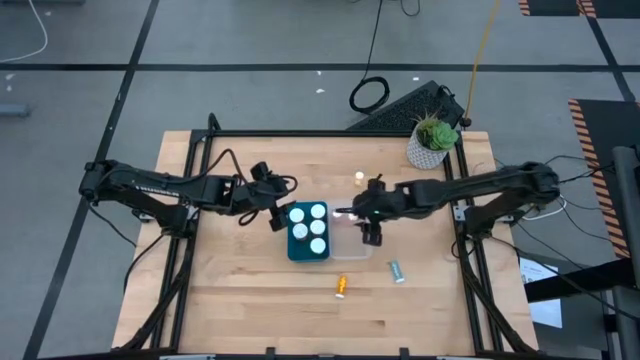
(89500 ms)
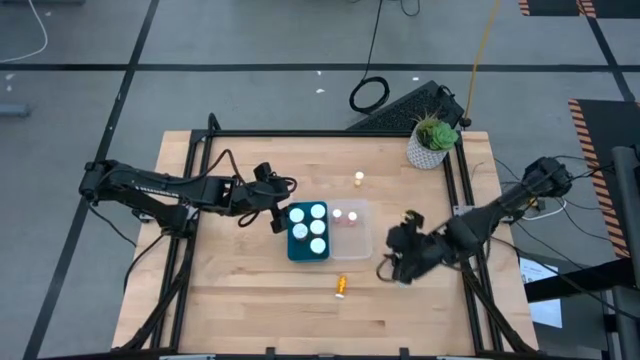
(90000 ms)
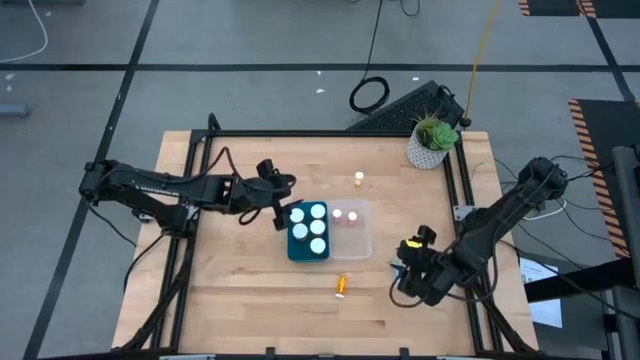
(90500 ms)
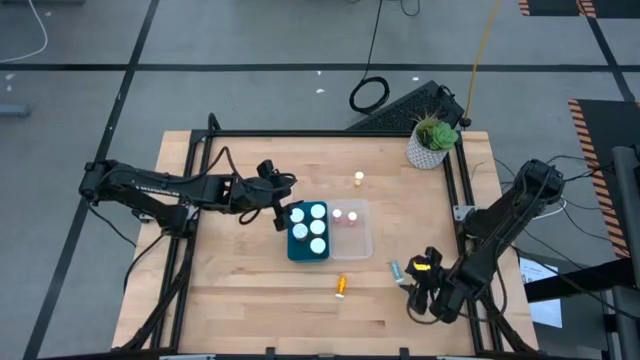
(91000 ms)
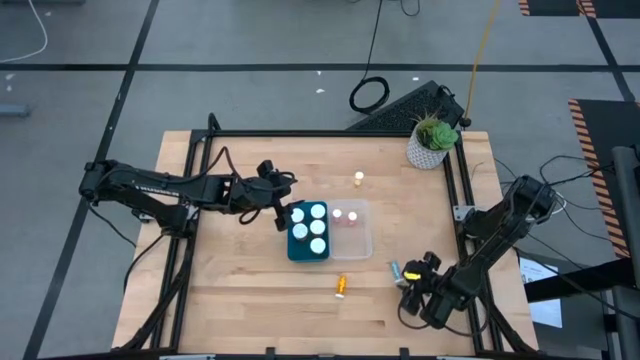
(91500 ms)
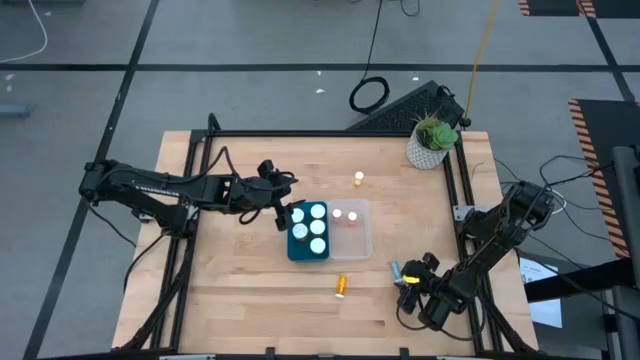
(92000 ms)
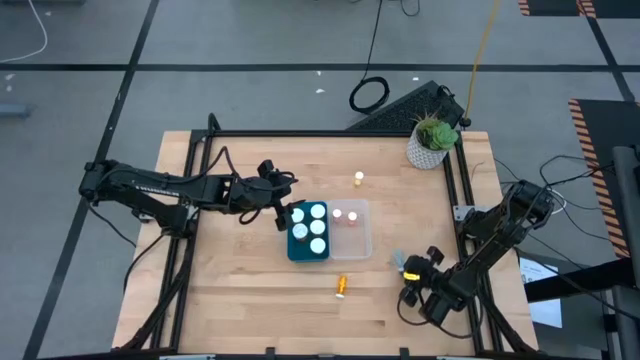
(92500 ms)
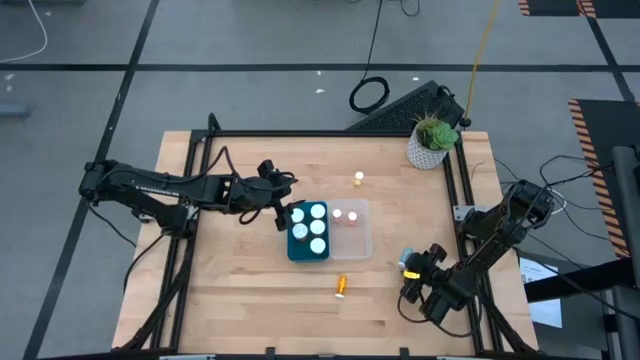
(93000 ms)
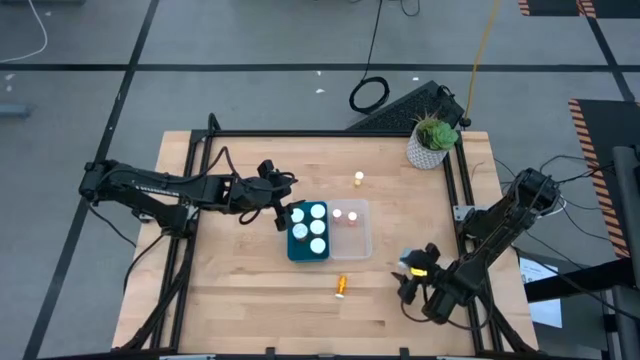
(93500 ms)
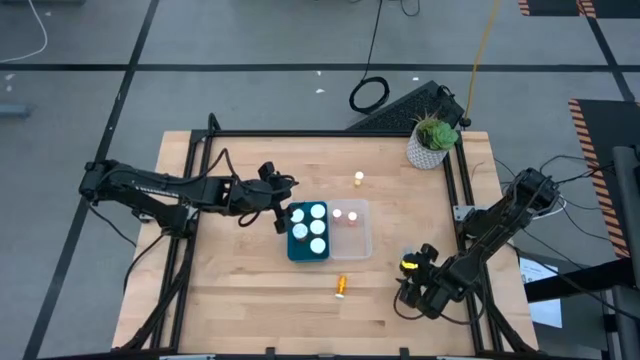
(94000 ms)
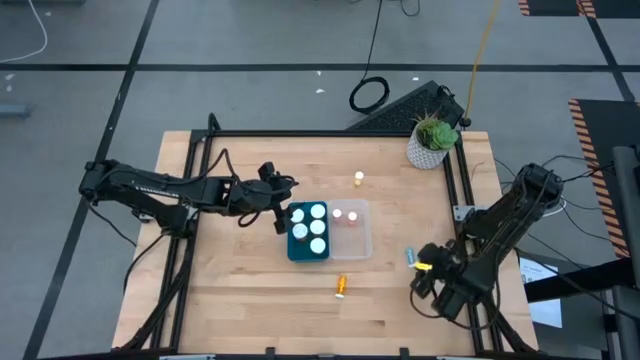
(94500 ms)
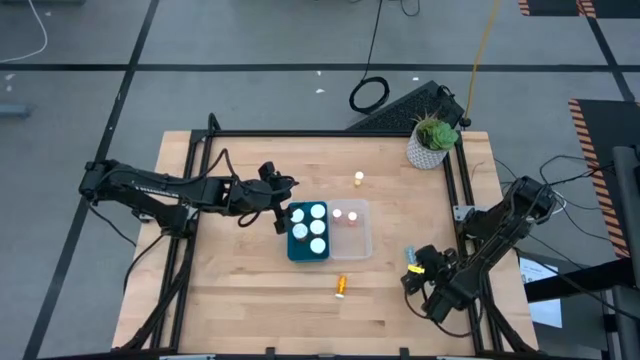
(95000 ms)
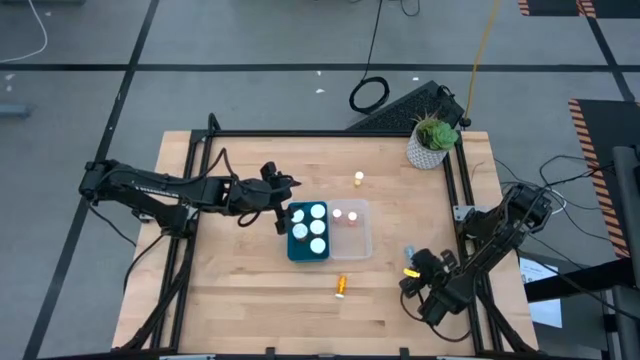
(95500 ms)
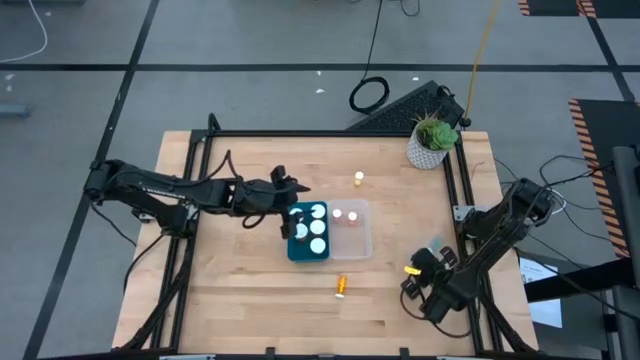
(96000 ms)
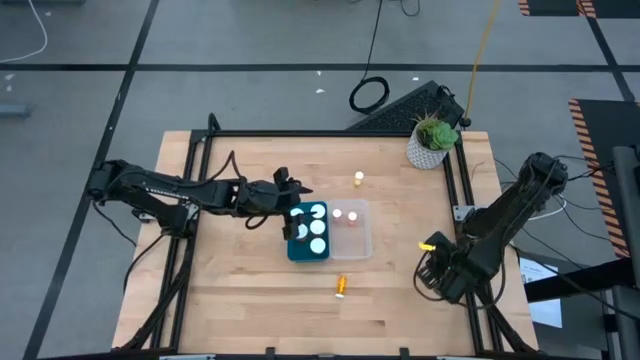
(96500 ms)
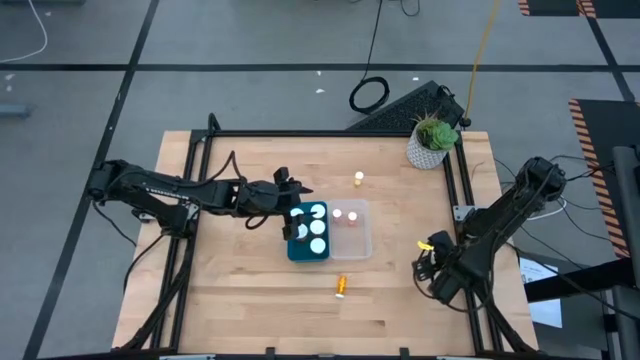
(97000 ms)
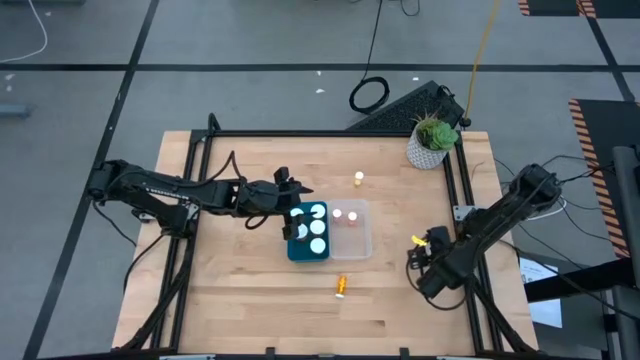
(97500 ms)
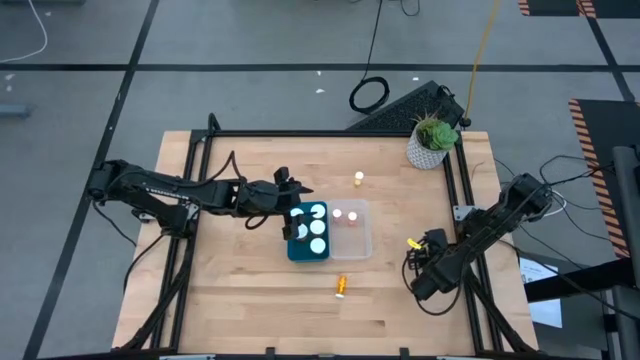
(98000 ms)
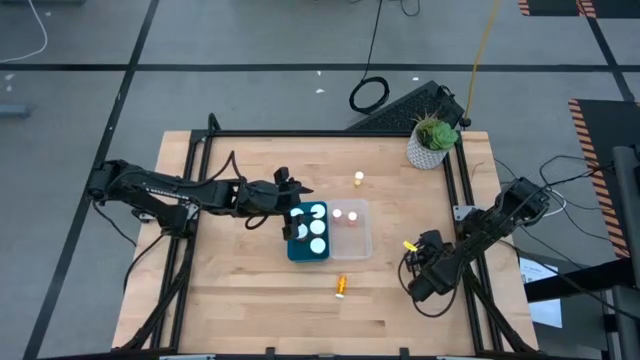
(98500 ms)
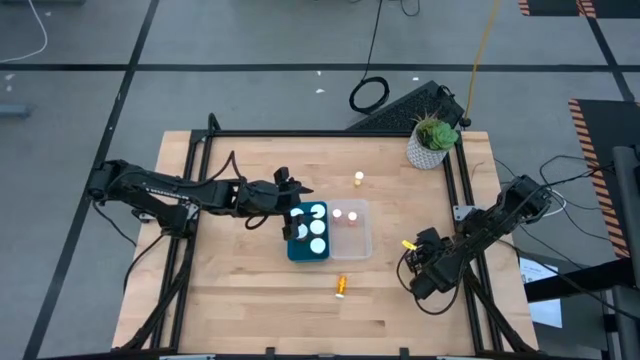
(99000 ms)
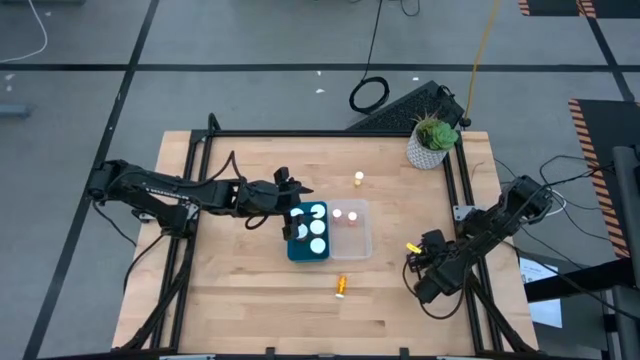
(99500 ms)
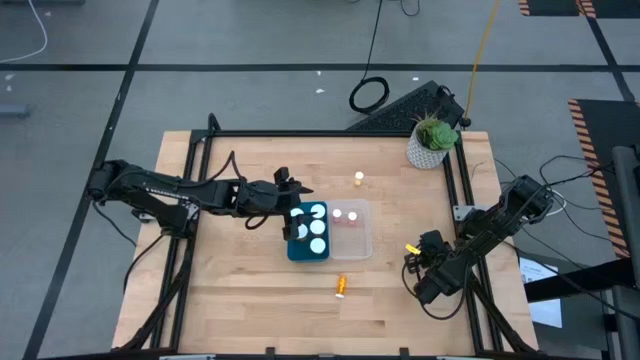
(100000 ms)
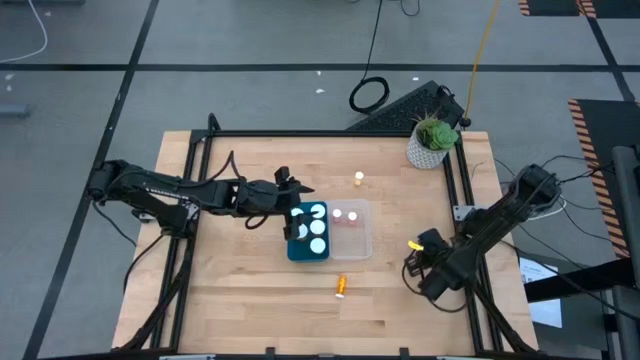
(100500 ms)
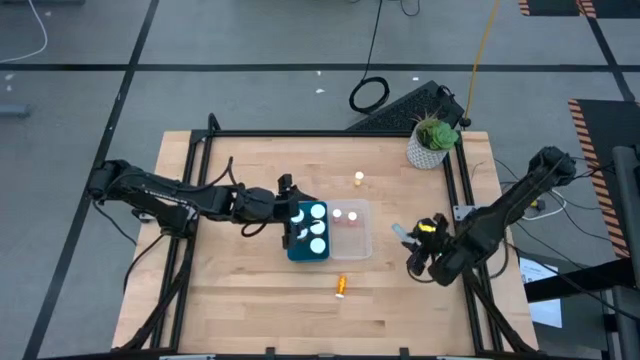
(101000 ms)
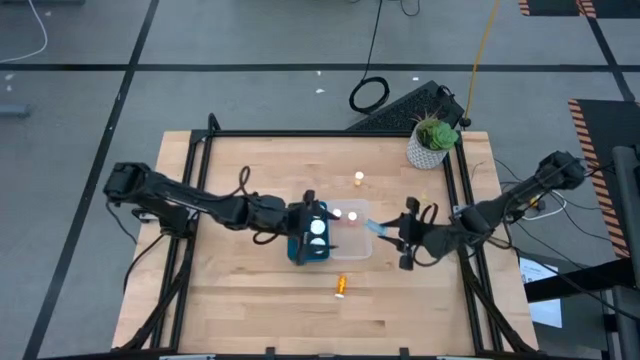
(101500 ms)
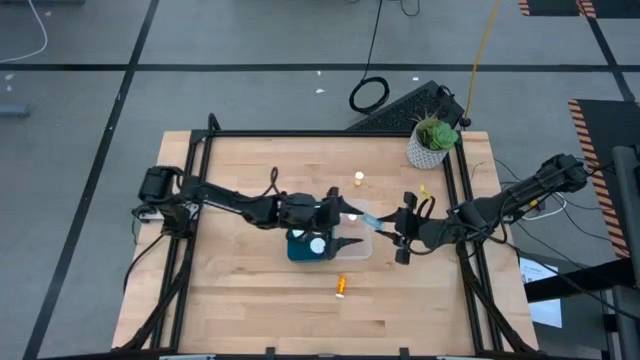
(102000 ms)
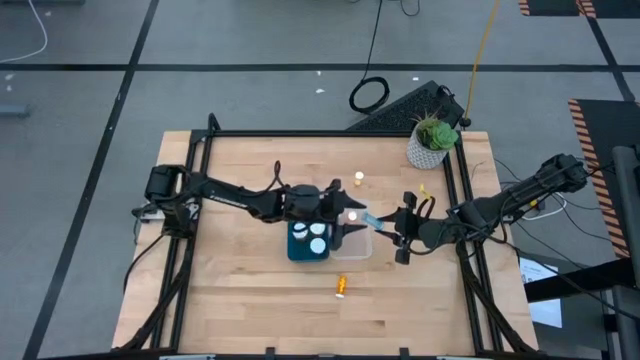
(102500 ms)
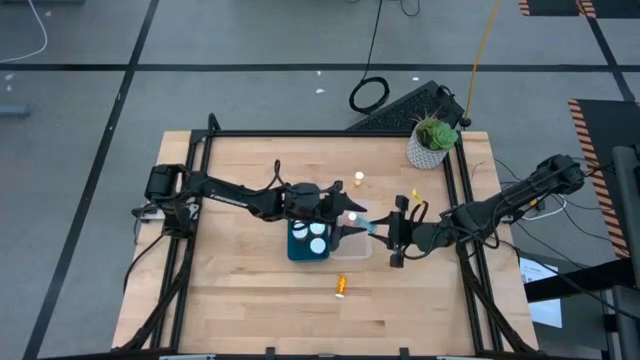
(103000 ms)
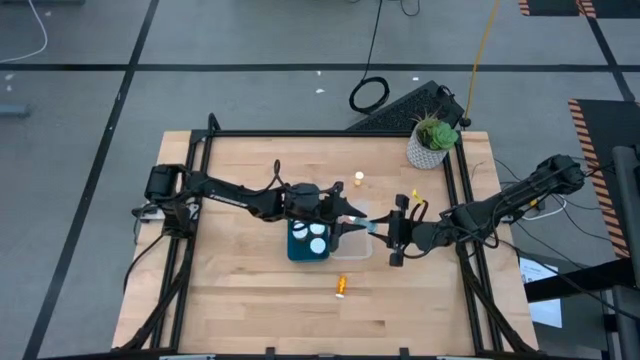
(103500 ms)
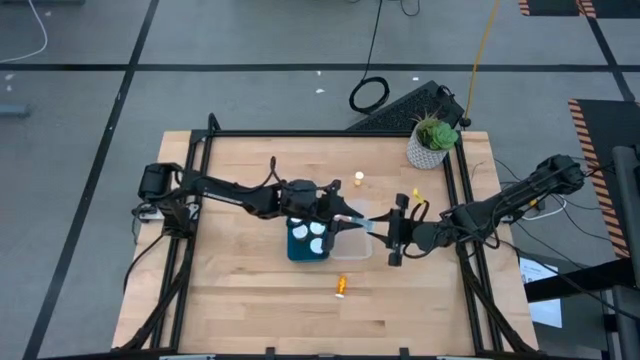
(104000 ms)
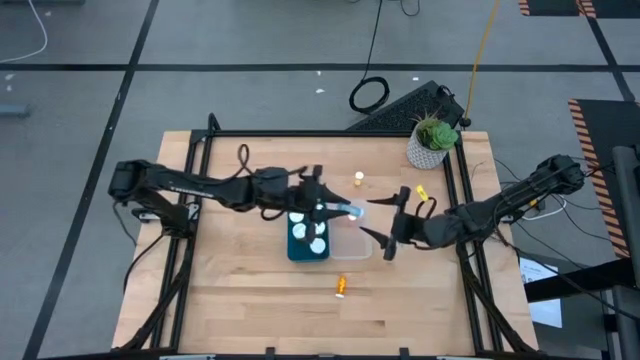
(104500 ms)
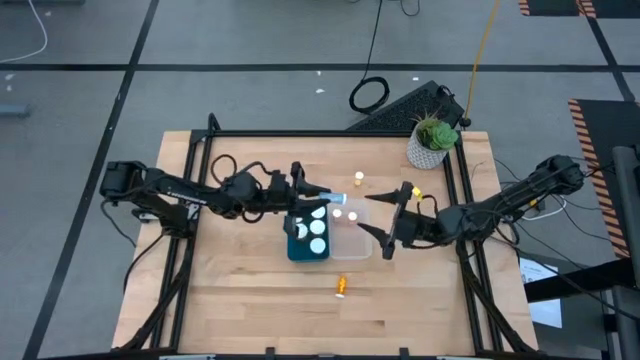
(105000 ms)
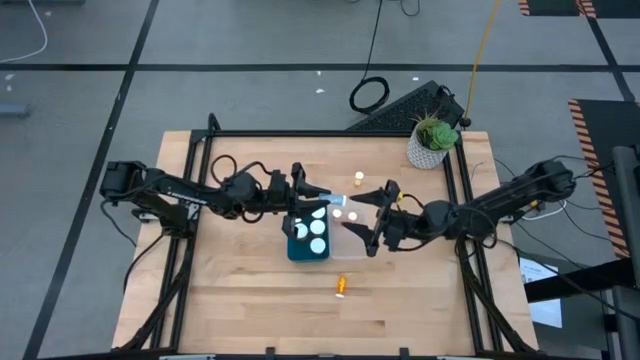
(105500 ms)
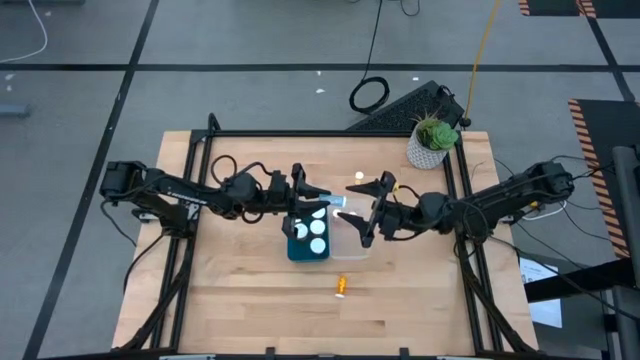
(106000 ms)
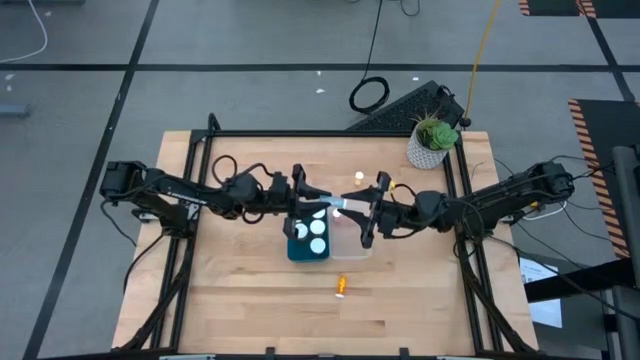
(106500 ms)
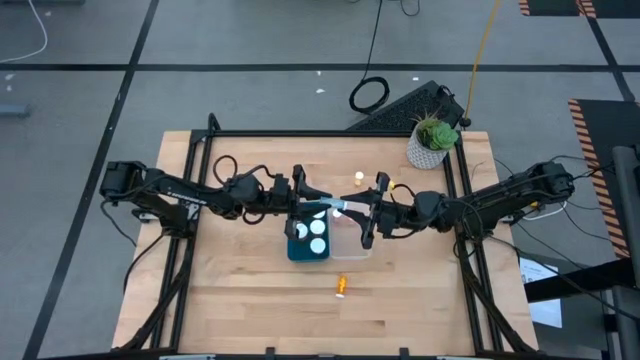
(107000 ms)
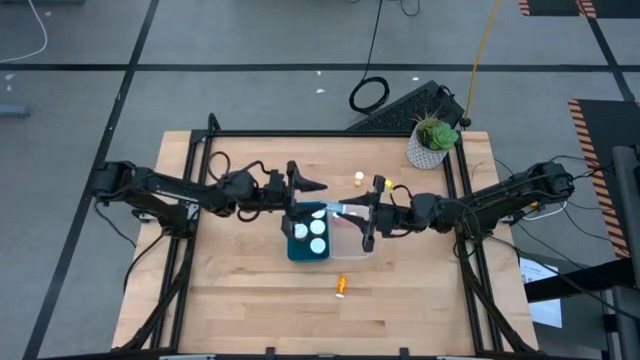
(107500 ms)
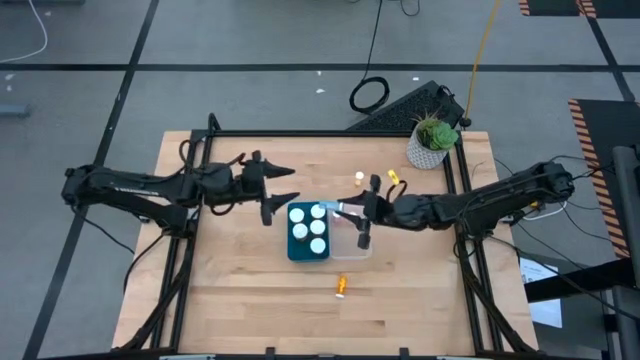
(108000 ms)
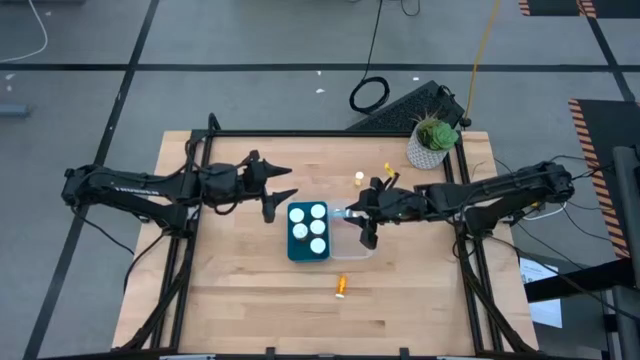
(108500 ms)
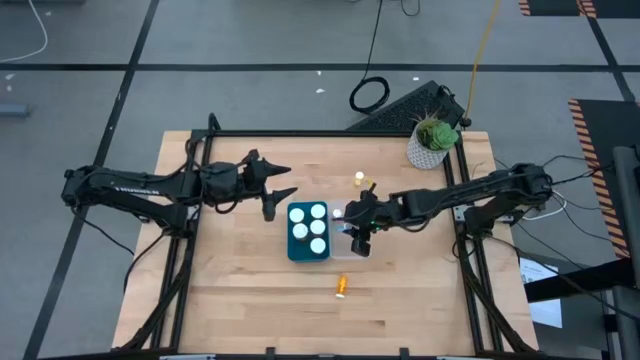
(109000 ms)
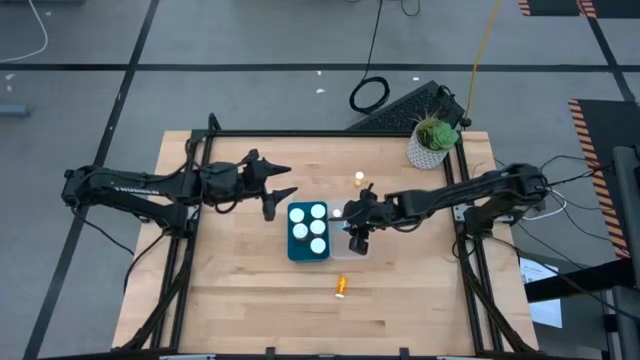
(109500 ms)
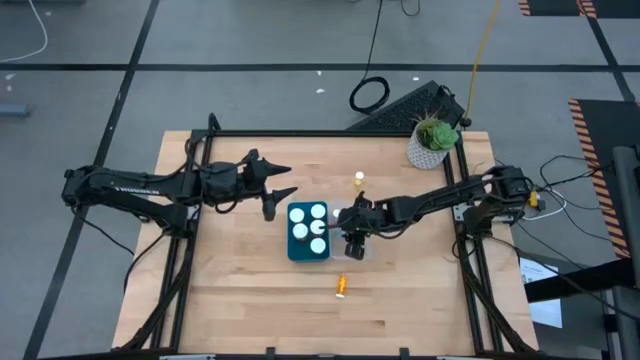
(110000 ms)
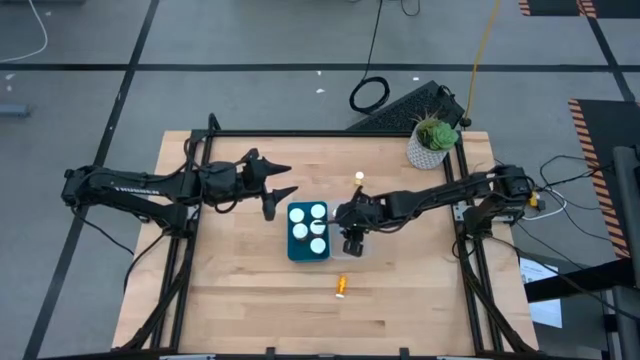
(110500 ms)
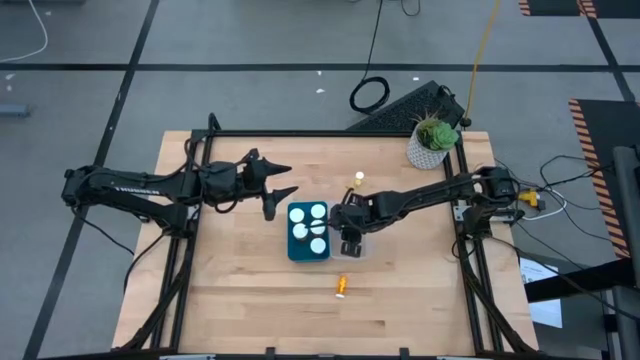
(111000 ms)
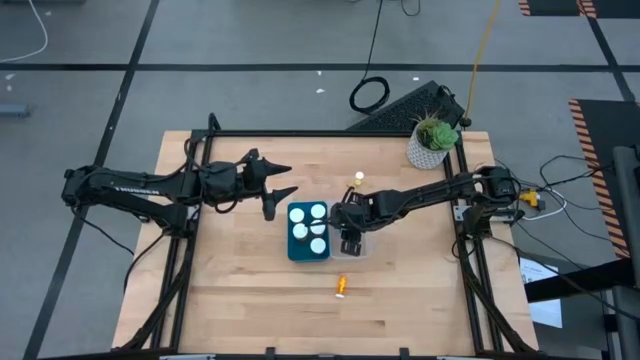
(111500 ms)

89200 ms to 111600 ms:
Task: Pick and place medicine bottles into bin by pill shape (circle, oval)
Put the small blue pill bottle into the transparent bin
